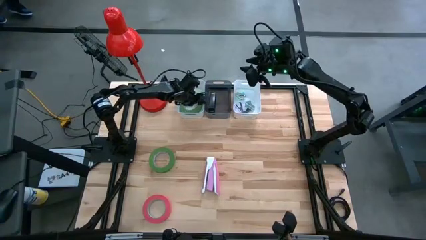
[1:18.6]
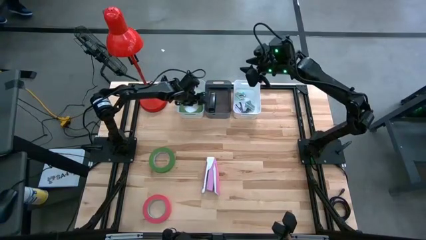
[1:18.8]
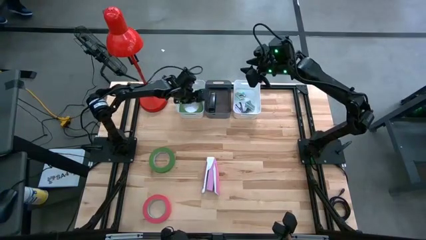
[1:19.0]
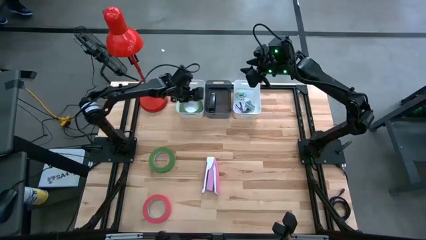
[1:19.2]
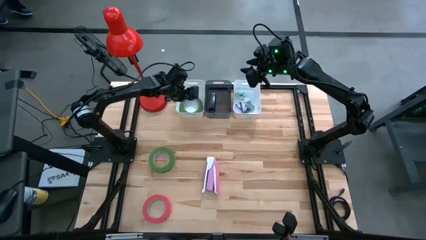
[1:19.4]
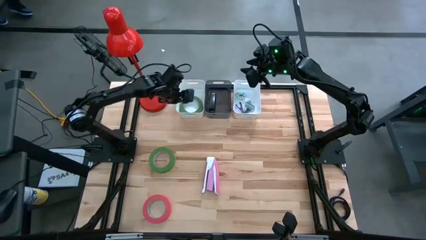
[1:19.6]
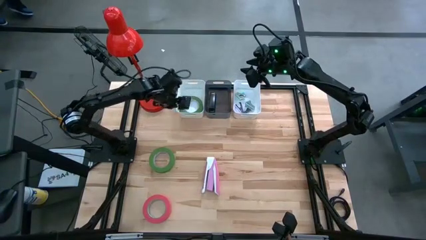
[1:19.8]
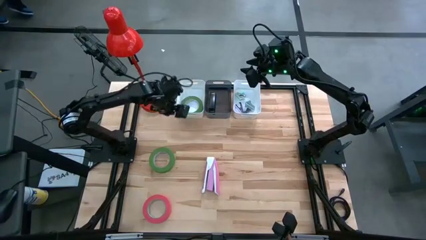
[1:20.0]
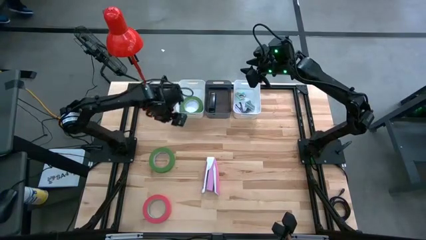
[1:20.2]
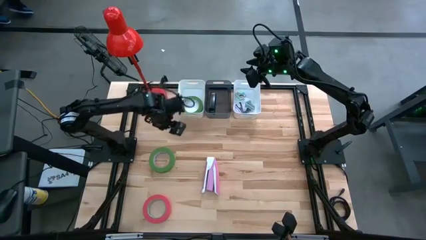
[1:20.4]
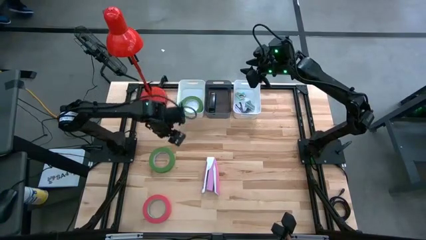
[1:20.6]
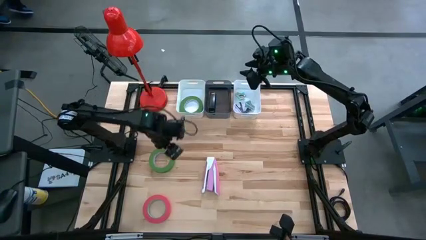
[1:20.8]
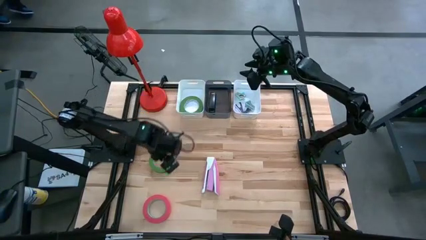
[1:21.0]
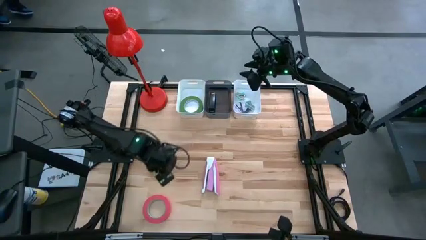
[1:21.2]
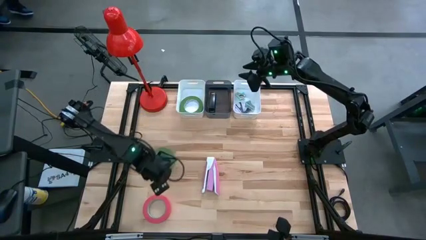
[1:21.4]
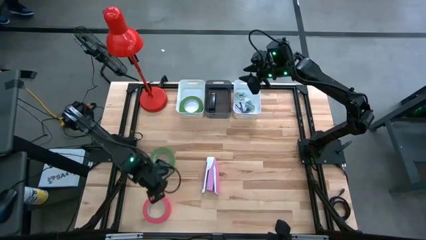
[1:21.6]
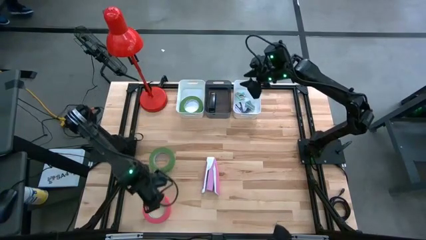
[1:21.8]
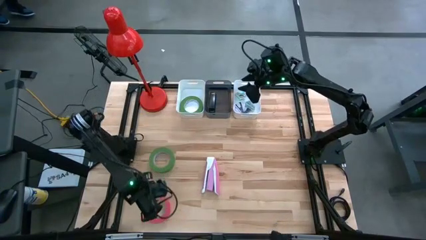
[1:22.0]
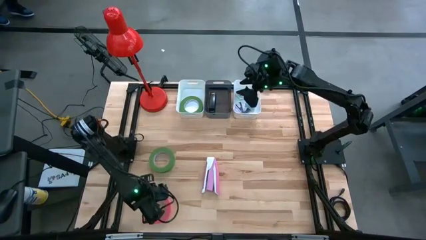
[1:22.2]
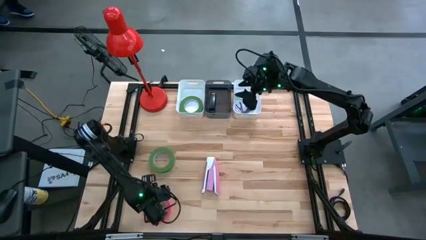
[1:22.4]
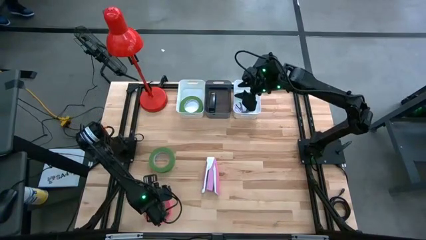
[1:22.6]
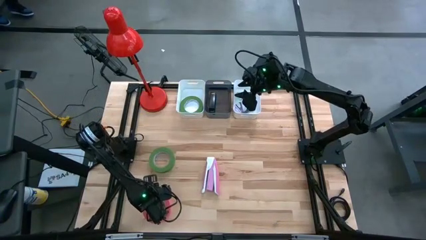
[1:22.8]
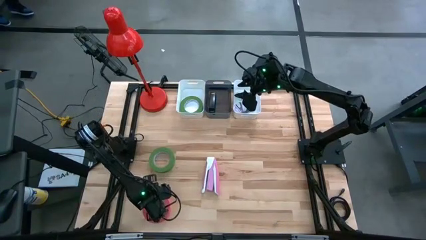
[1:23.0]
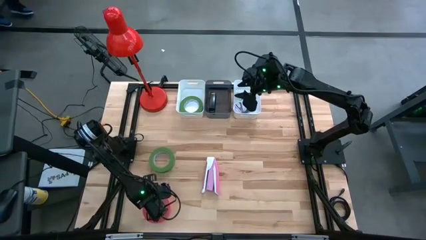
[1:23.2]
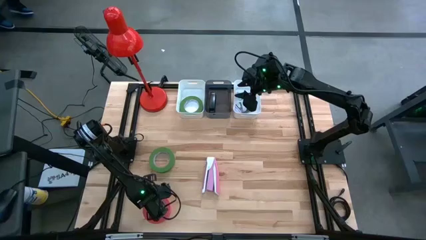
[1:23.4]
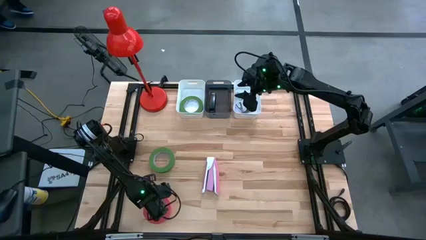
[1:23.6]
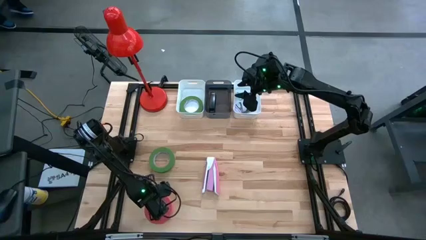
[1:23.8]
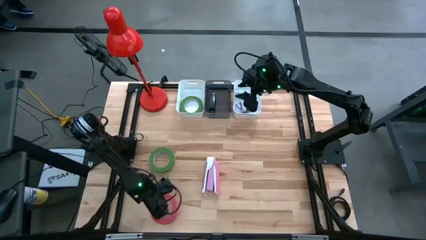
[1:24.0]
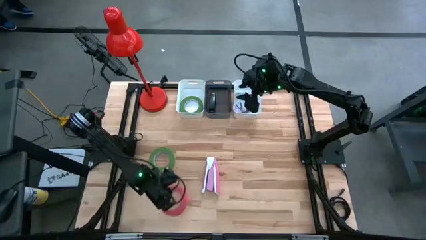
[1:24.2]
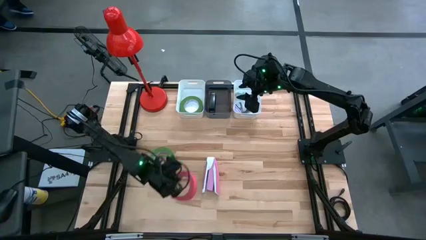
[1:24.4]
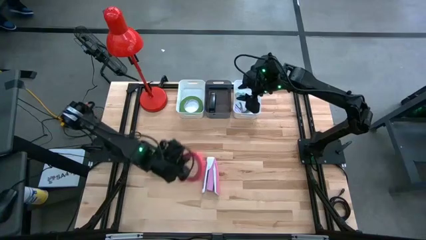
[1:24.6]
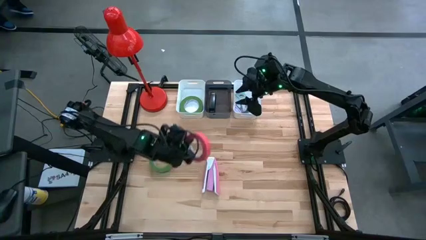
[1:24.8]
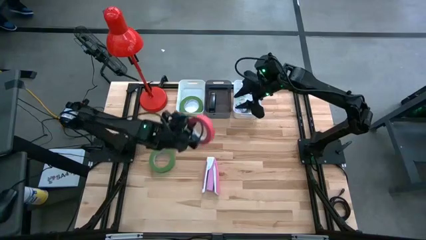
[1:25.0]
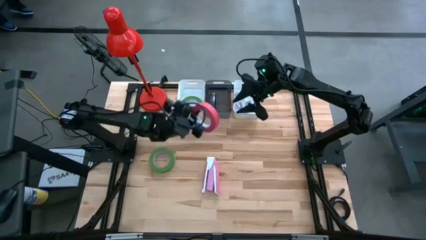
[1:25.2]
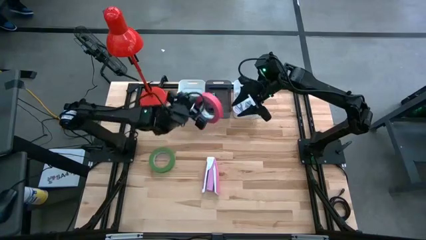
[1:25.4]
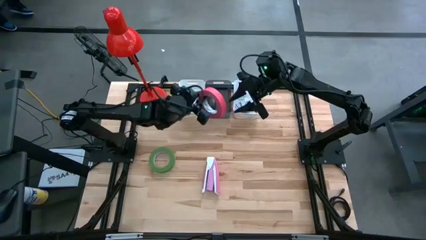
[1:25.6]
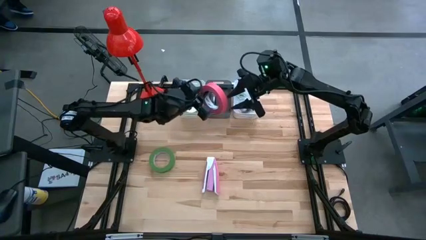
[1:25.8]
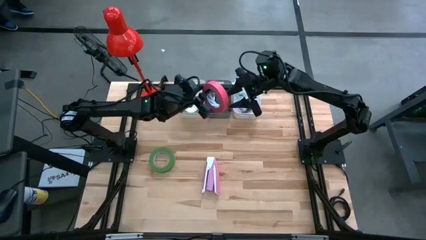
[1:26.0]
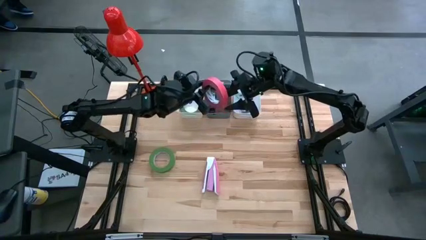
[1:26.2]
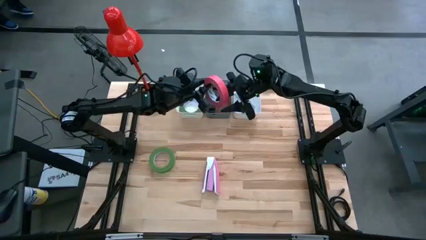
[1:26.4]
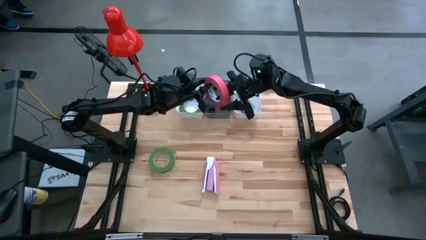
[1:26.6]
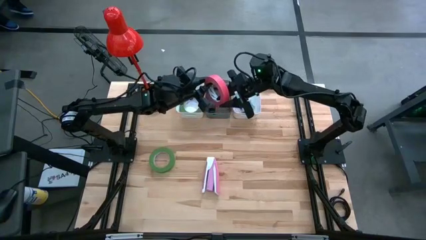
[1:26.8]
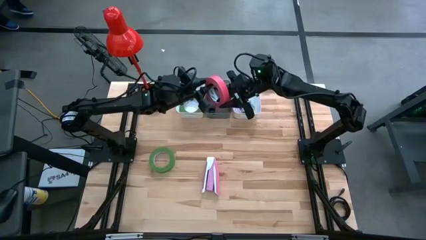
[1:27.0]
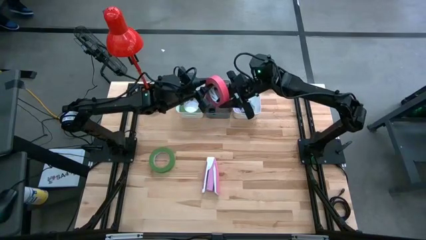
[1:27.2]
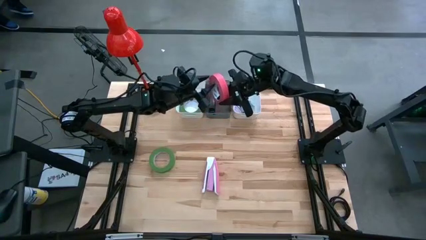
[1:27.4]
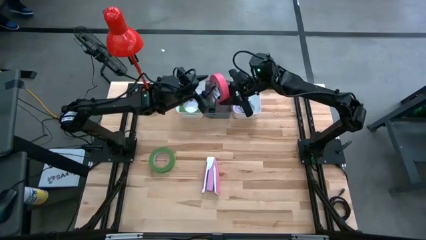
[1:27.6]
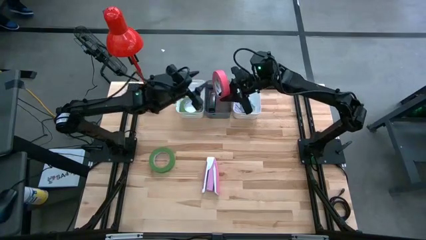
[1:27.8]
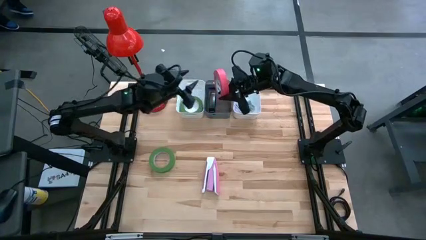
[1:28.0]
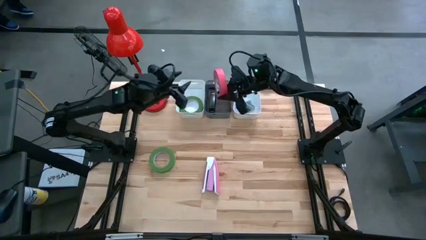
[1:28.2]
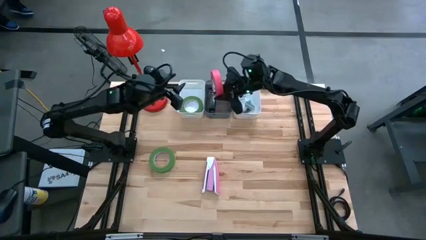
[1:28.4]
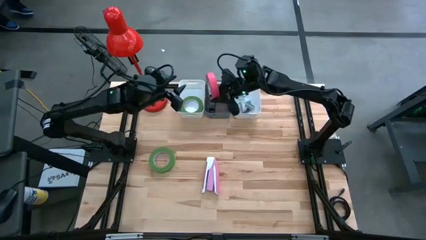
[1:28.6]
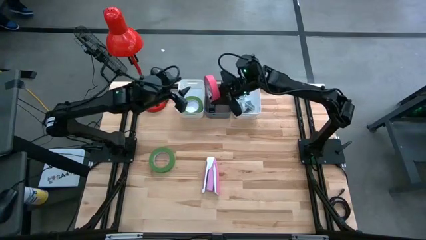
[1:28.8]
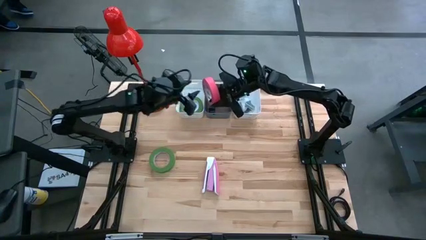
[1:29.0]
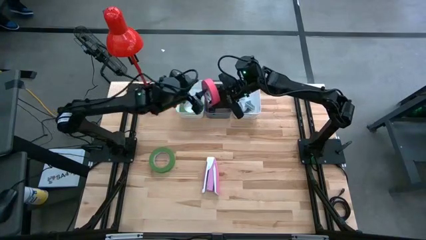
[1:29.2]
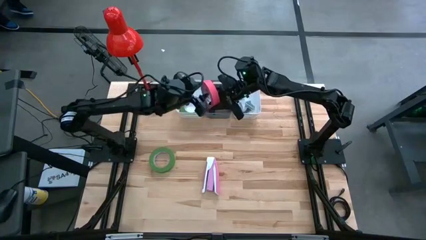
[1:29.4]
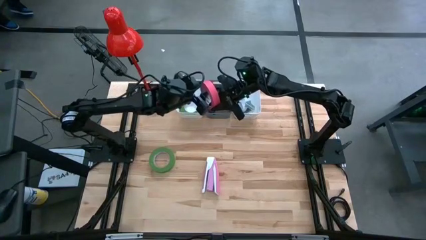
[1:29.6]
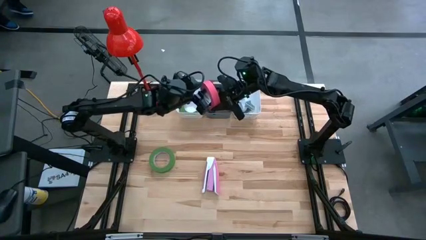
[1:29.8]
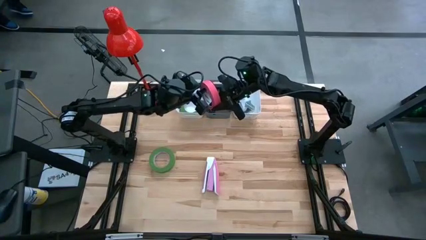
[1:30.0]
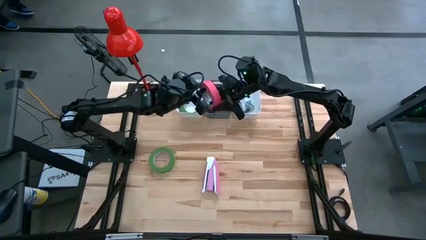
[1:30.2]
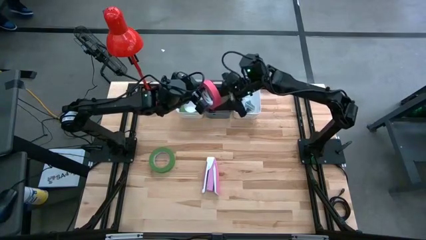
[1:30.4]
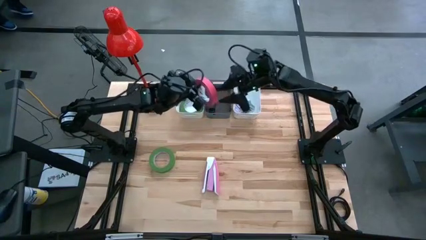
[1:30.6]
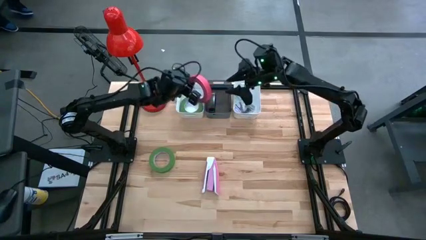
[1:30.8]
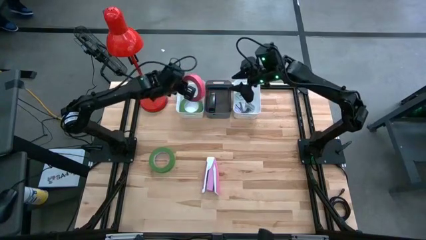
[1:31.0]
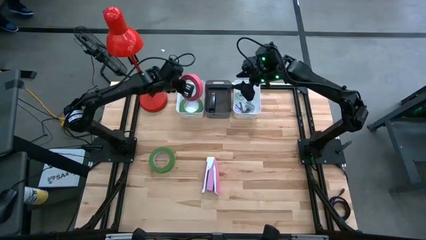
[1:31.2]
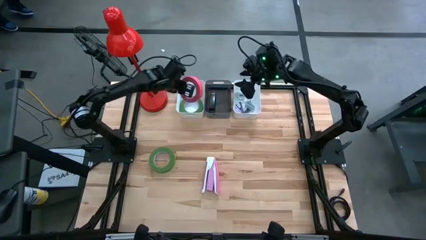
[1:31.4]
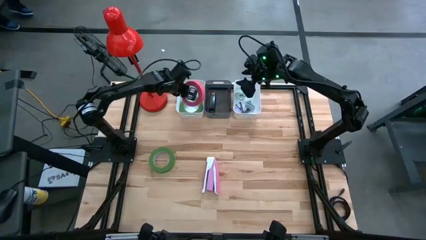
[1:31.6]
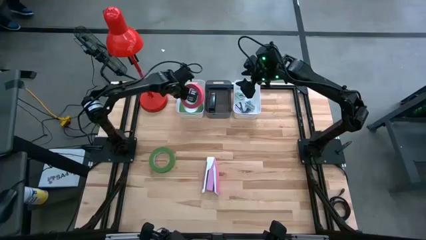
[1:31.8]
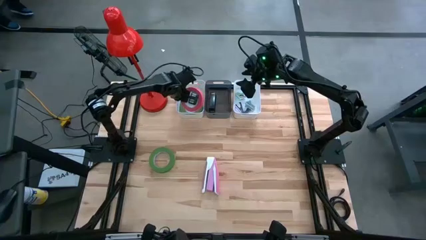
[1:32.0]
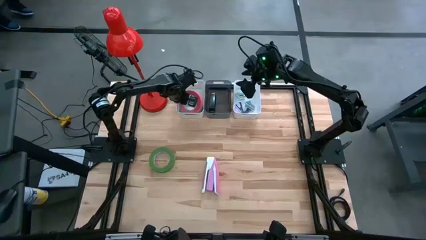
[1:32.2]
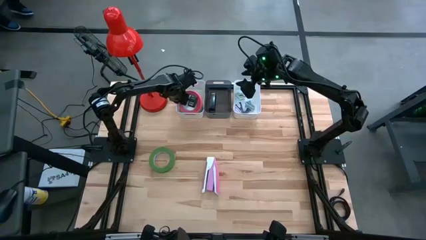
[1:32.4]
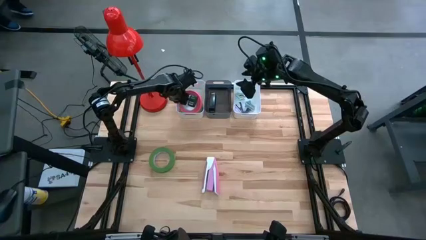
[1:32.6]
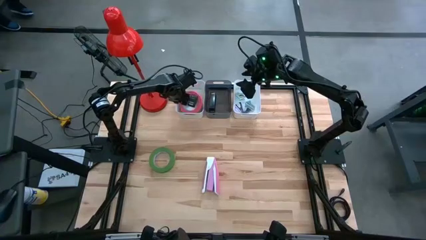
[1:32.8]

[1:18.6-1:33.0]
Task: Pick and place Stapler, Stapler remover, tape
Put the pink tape into the left white bin
